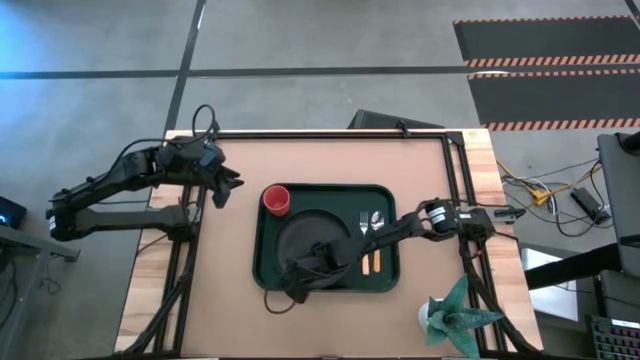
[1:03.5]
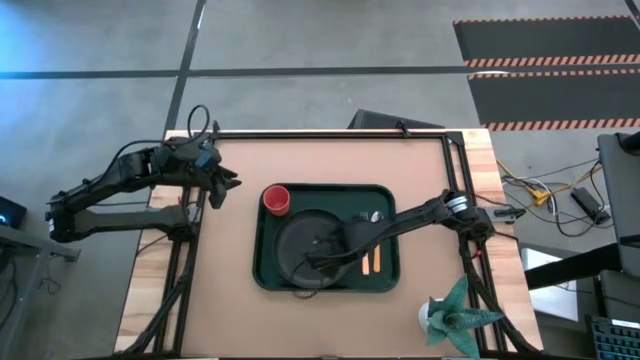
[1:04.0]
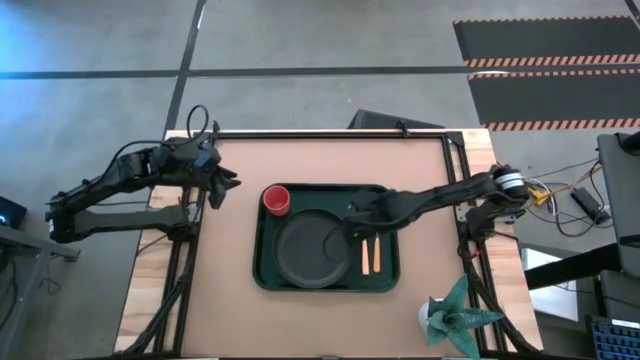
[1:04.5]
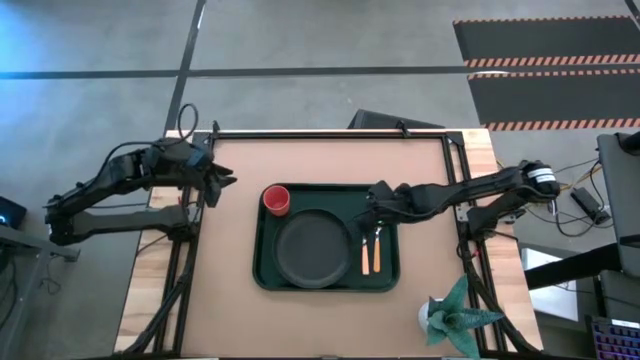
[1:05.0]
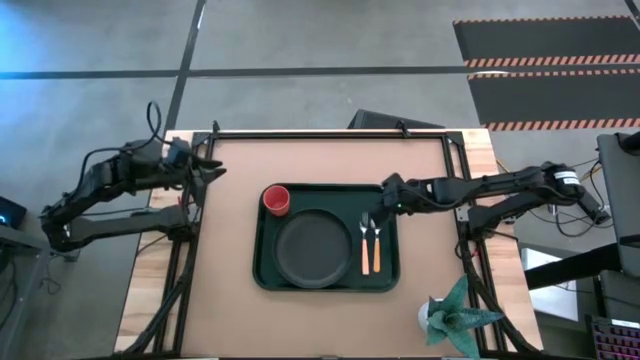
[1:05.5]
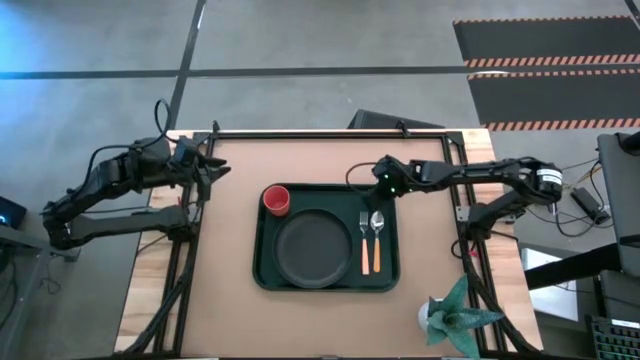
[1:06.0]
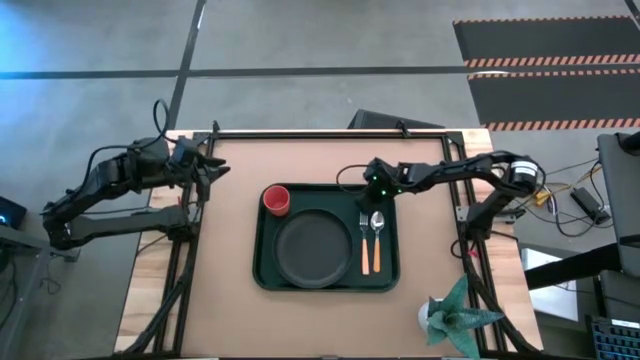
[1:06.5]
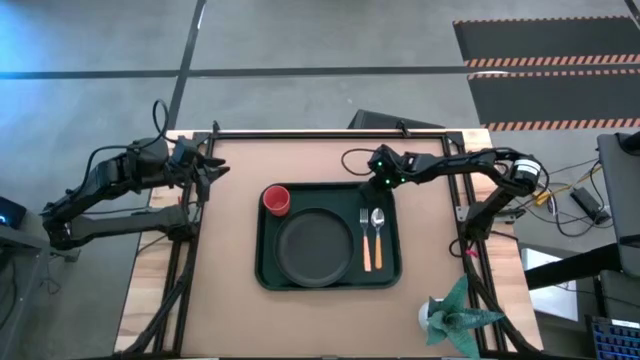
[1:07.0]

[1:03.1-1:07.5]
Task: Pick and place plate/cup/fork/spoon on tray
Adjust the green tray

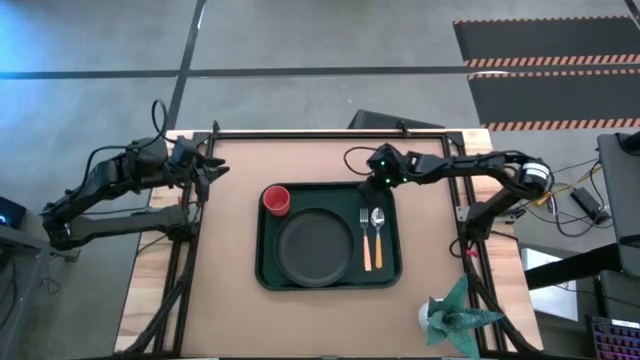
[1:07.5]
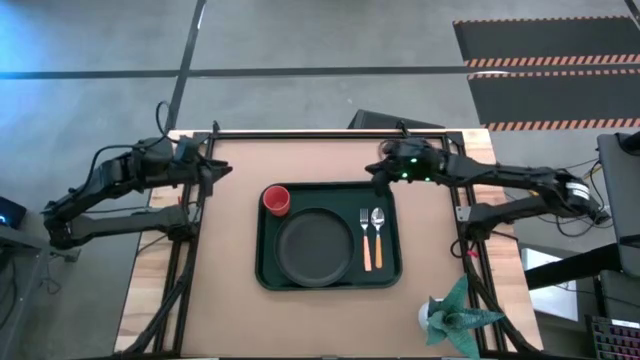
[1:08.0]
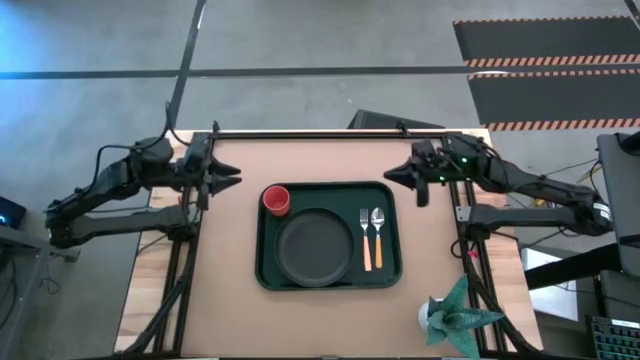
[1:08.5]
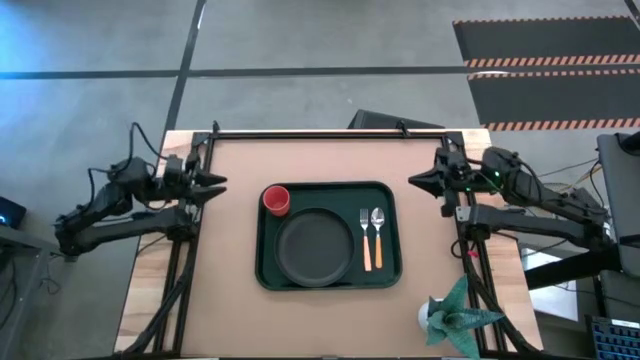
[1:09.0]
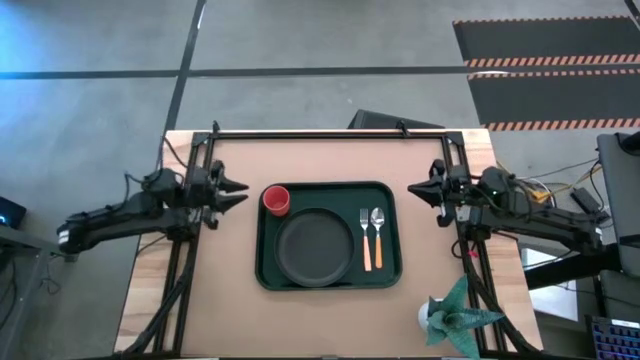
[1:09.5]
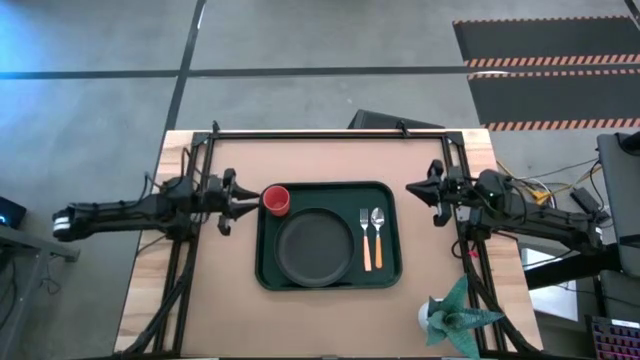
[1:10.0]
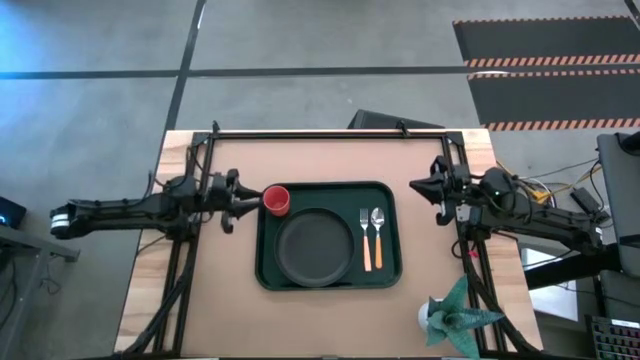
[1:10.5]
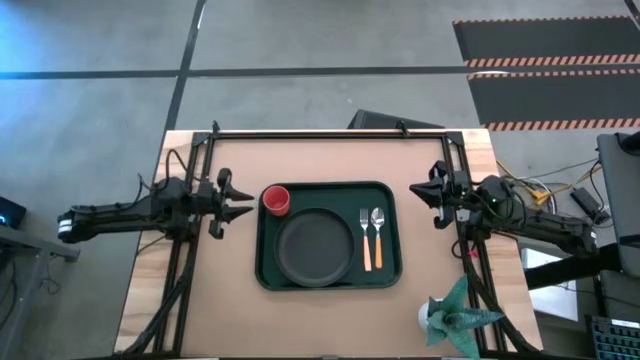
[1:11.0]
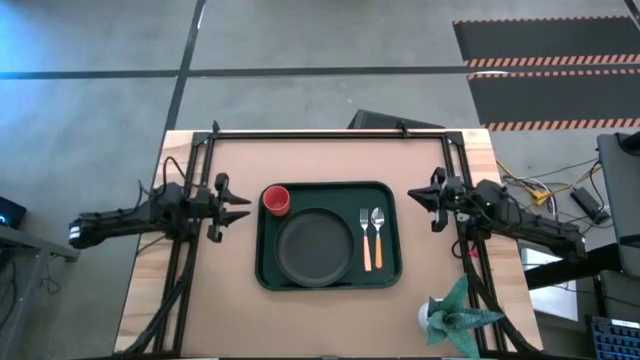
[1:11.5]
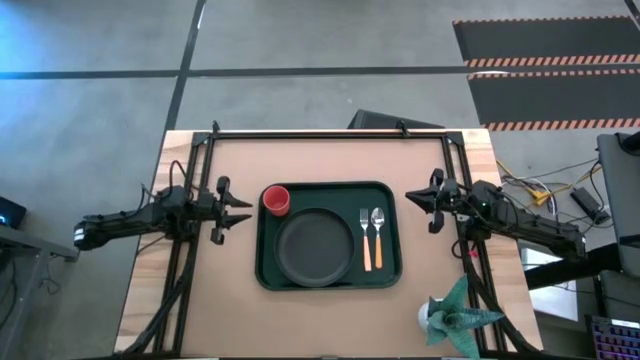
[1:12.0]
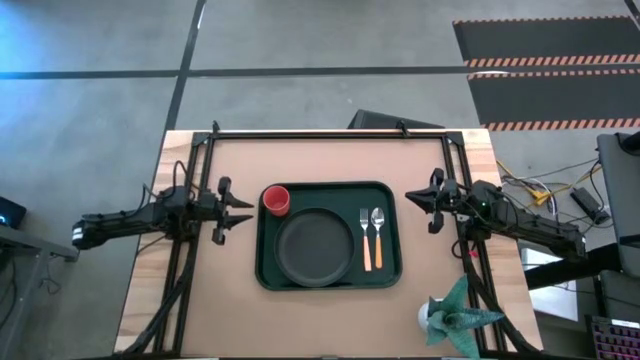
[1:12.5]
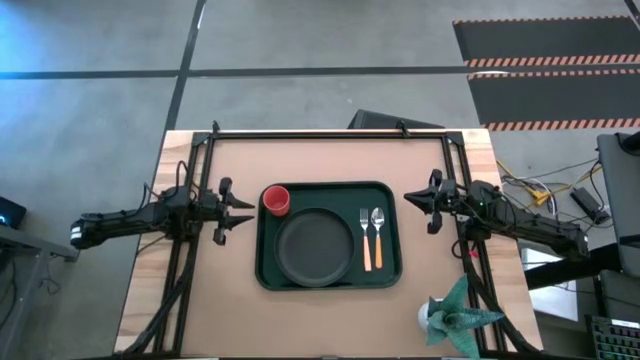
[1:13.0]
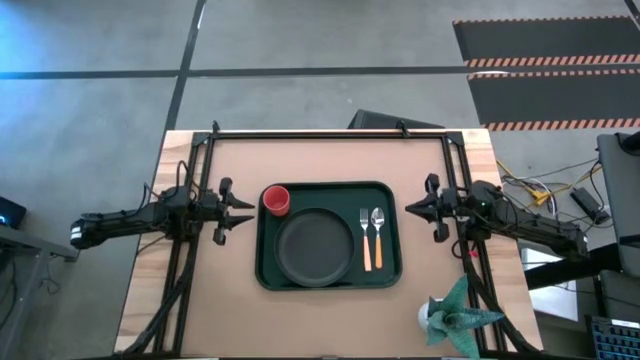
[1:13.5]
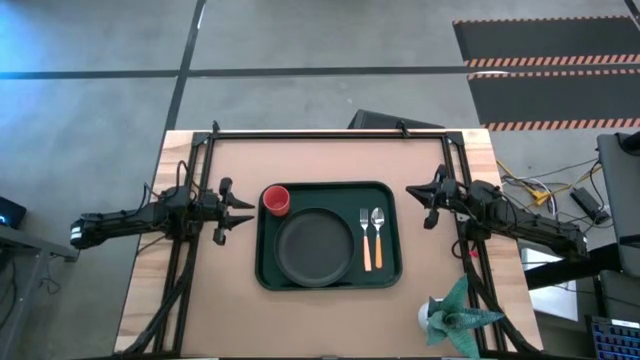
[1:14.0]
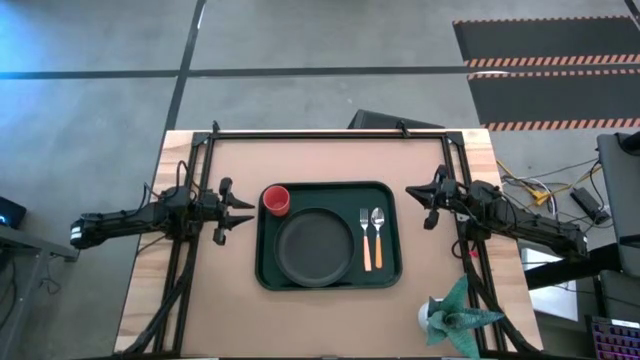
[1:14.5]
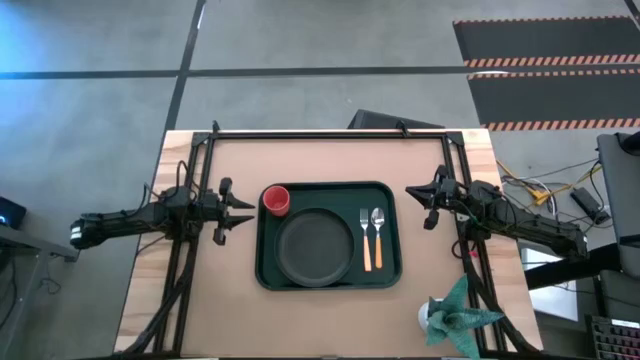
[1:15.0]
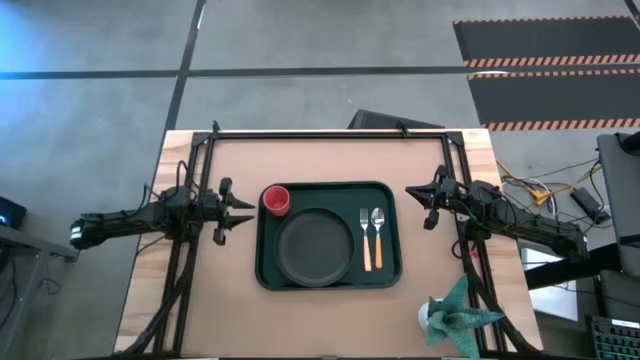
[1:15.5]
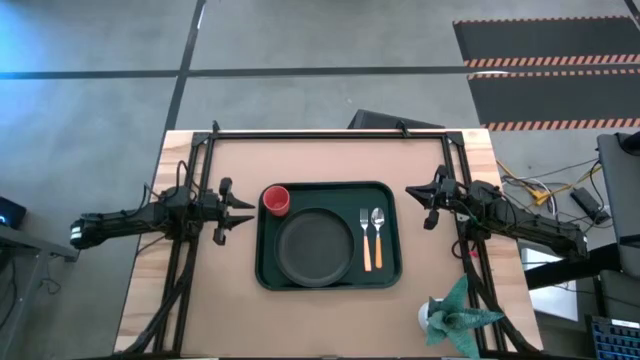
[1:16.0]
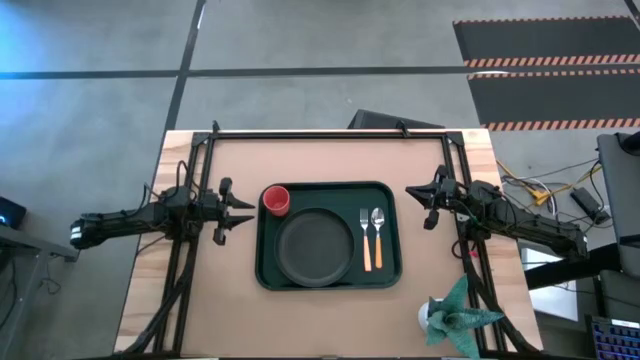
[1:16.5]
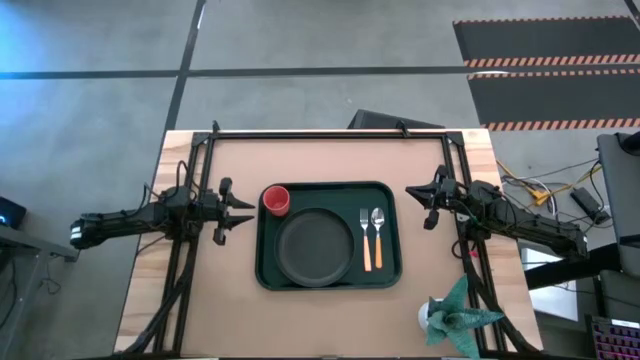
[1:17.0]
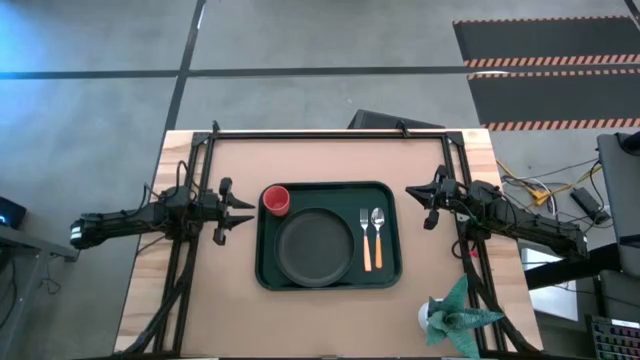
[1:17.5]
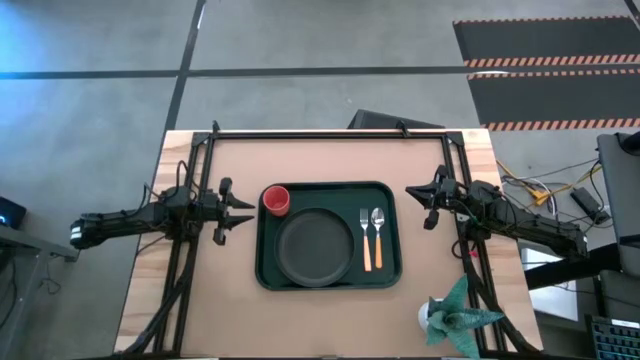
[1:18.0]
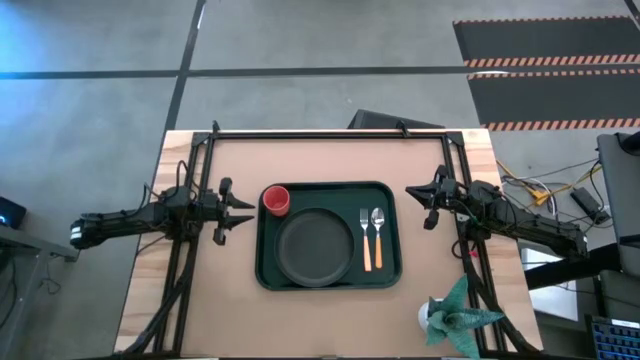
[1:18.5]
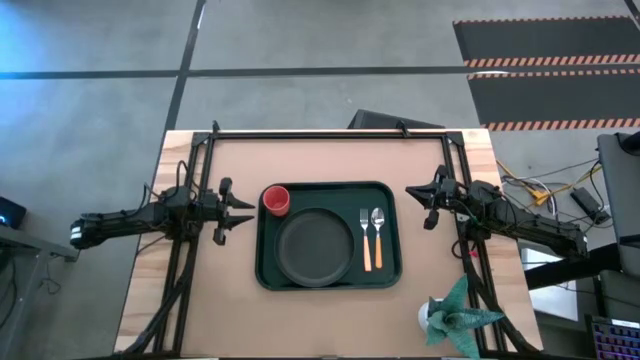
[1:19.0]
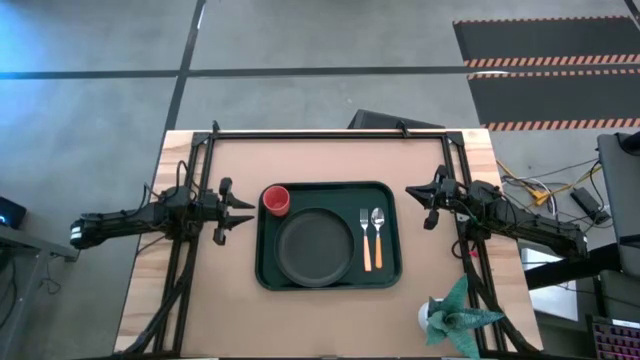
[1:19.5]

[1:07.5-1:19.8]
Return to Home Position

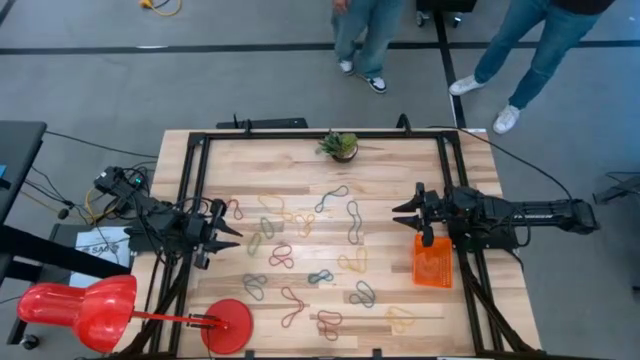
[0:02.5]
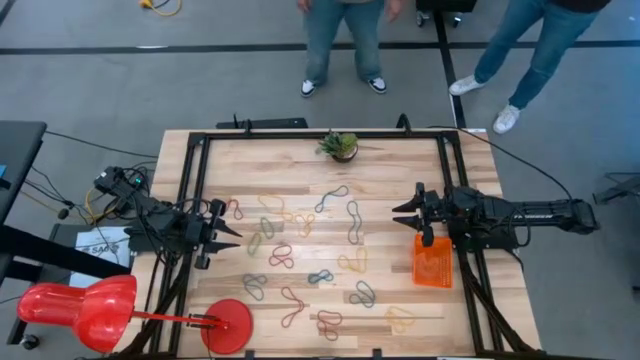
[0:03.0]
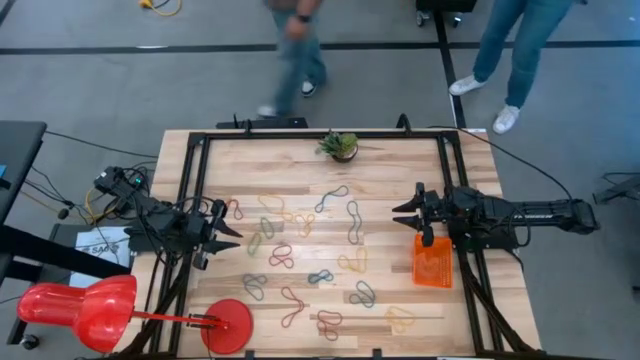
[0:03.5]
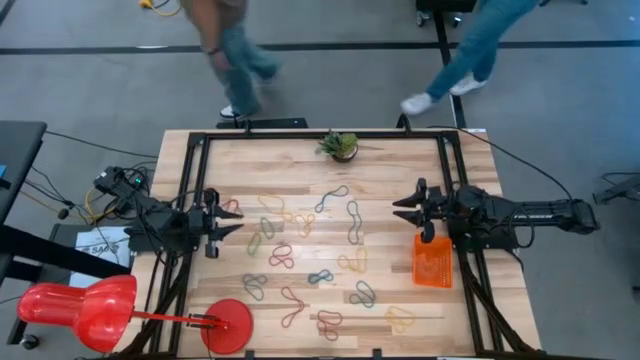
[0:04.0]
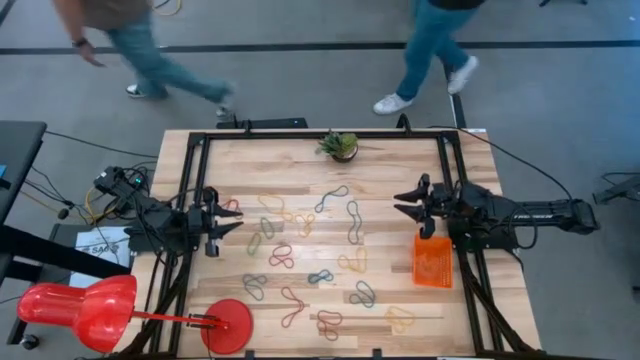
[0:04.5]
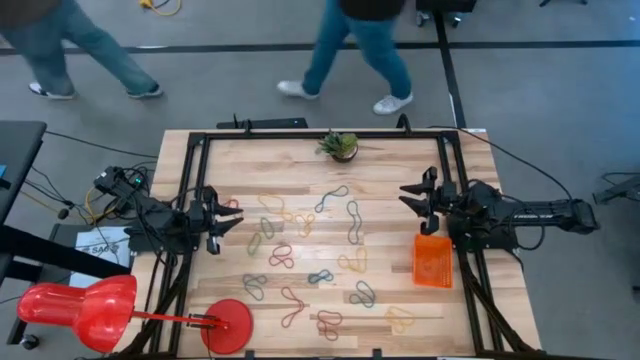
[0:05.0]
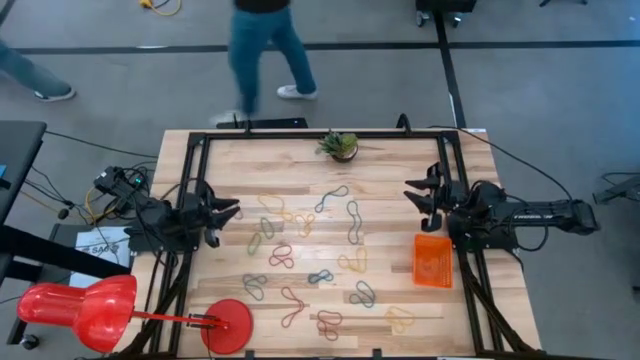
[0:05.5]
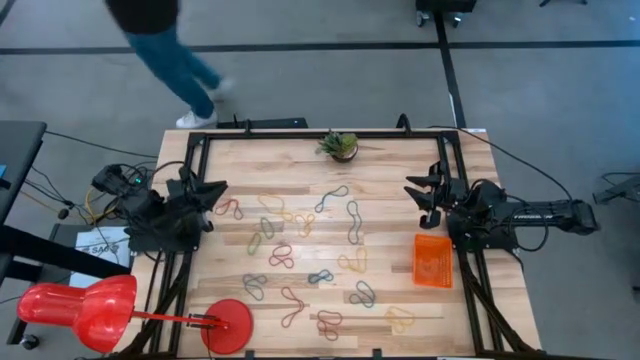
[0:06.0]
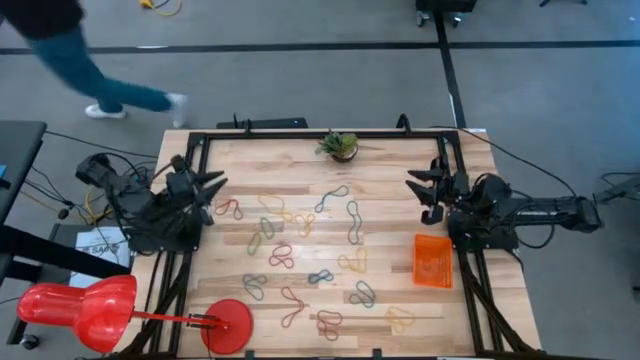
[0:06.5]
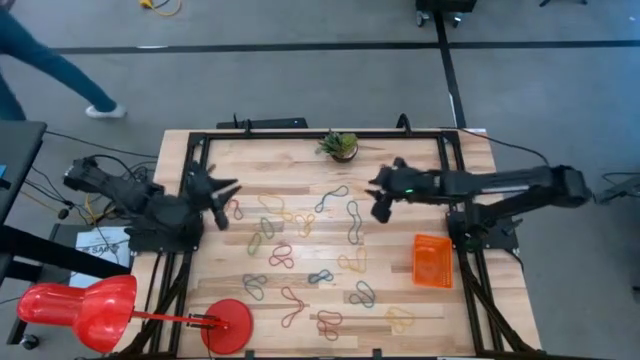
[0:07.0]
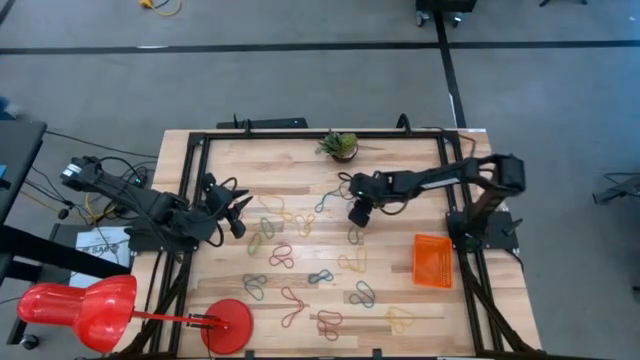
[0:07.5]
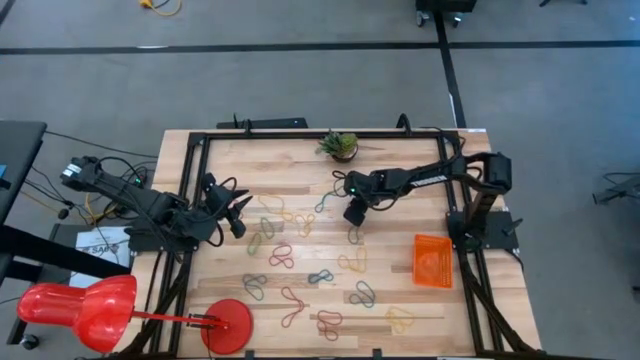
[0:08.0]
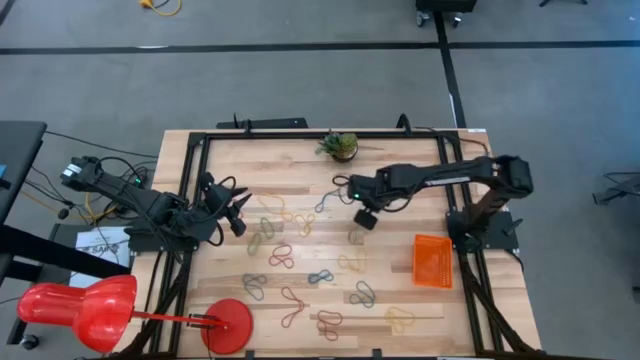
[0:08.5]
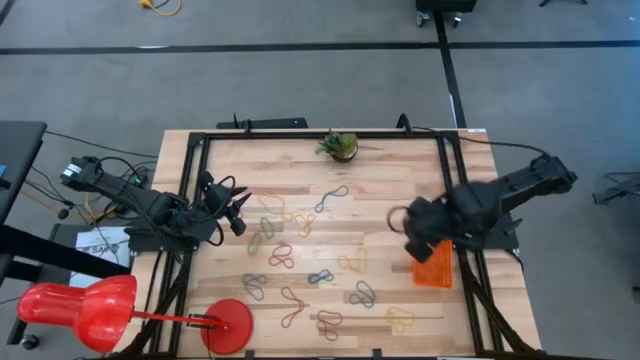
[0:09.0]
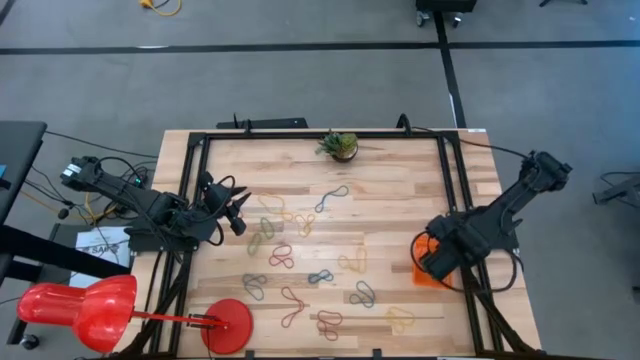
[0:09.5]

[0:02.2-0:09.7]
Task: Pick and place rubber bands into bin
Put the blue rubber band into the orange basket
